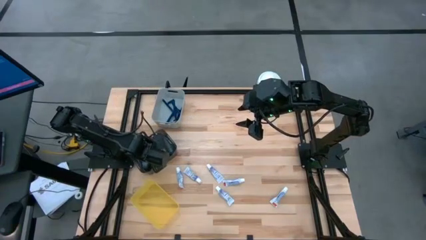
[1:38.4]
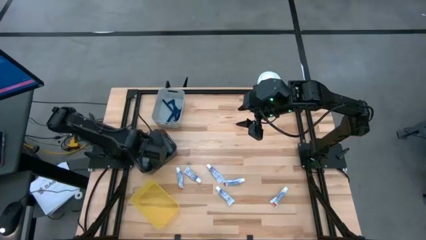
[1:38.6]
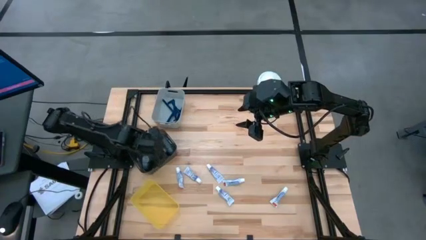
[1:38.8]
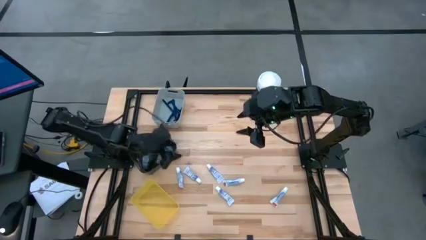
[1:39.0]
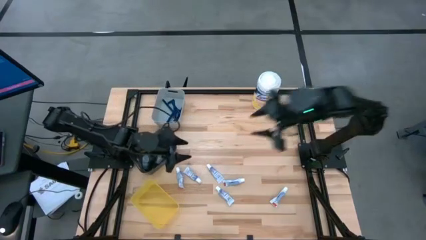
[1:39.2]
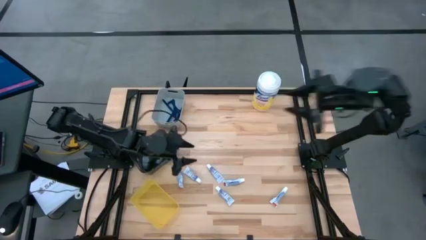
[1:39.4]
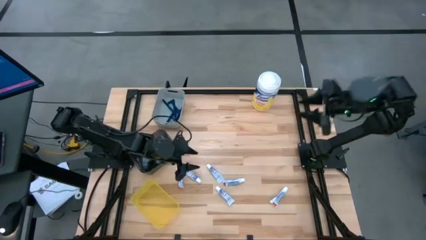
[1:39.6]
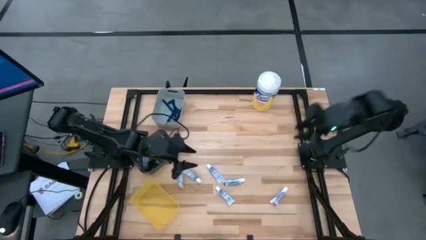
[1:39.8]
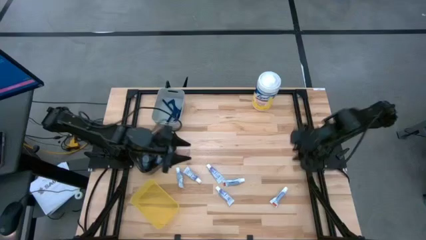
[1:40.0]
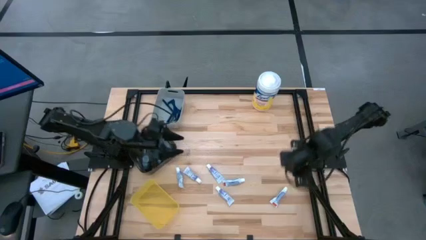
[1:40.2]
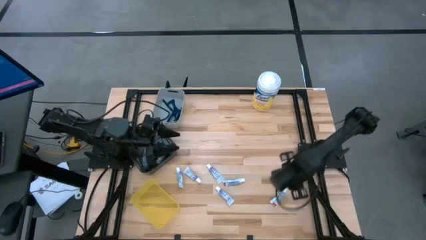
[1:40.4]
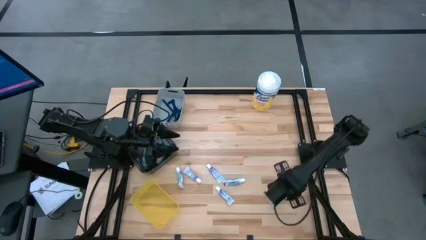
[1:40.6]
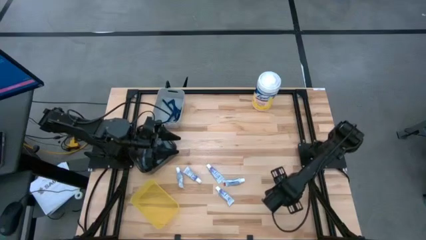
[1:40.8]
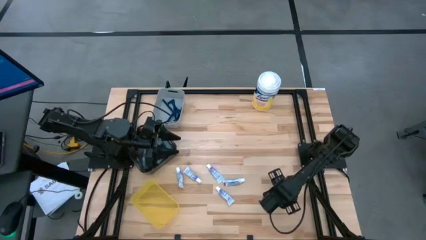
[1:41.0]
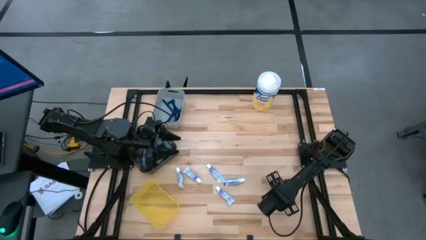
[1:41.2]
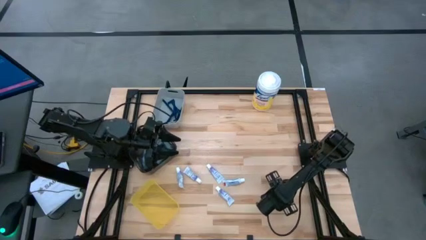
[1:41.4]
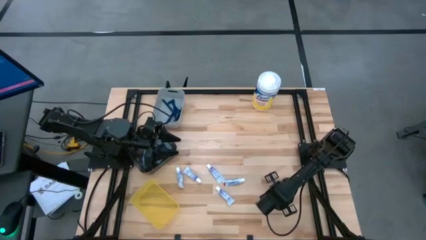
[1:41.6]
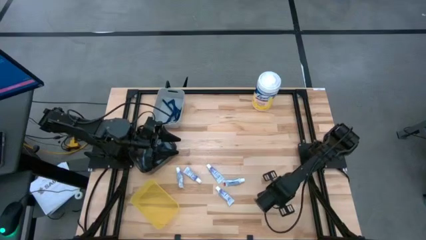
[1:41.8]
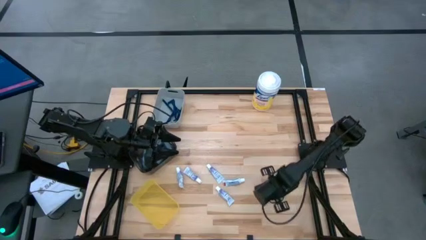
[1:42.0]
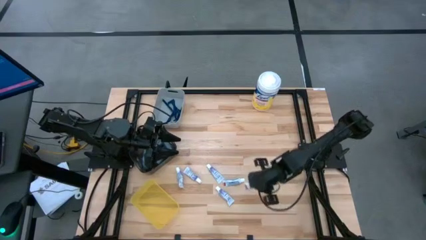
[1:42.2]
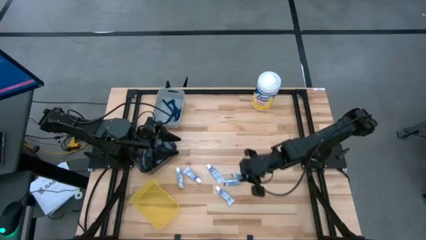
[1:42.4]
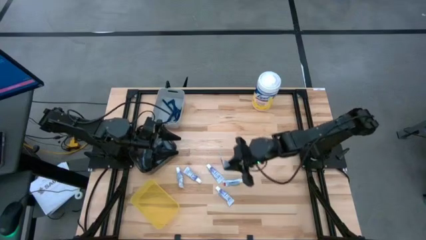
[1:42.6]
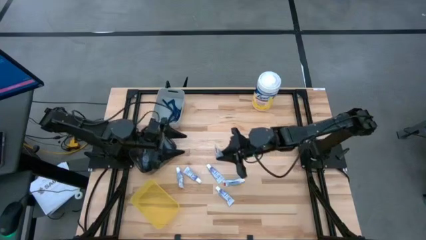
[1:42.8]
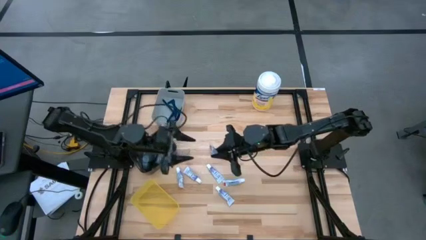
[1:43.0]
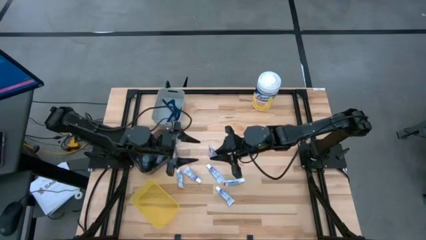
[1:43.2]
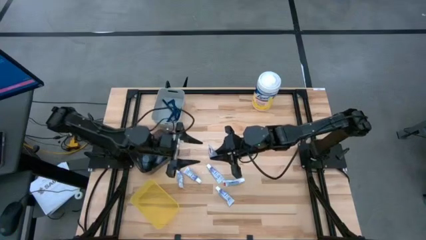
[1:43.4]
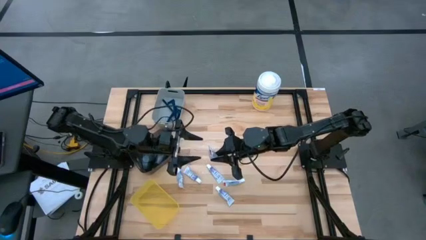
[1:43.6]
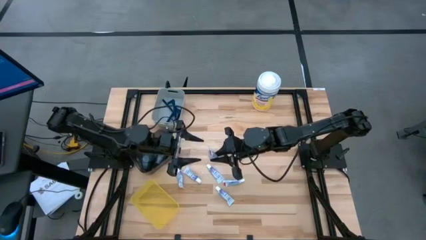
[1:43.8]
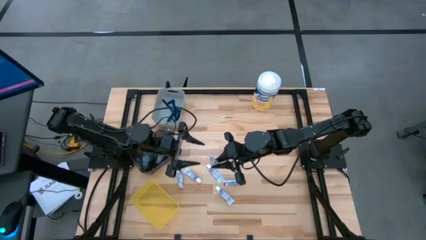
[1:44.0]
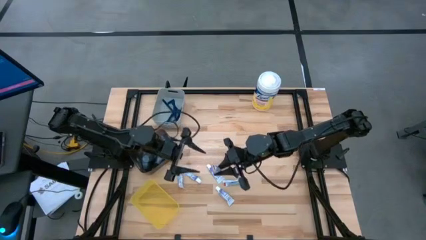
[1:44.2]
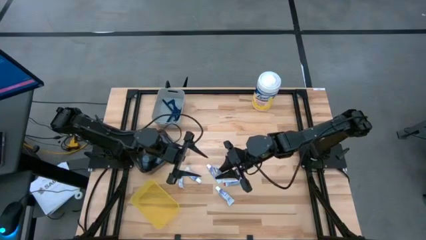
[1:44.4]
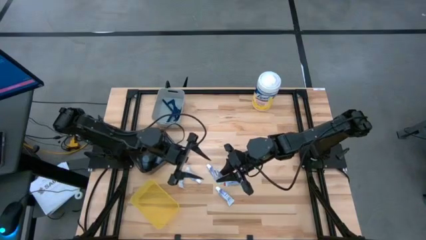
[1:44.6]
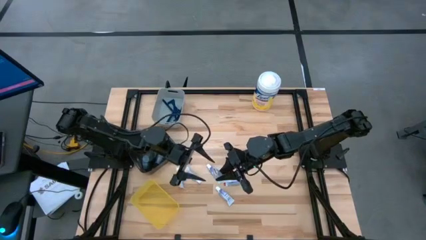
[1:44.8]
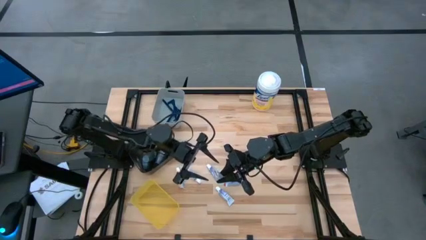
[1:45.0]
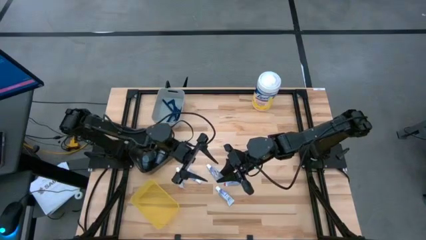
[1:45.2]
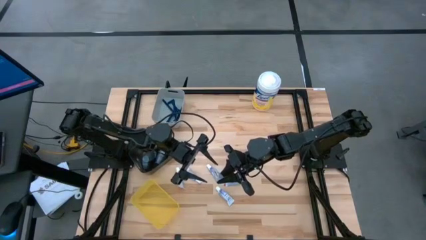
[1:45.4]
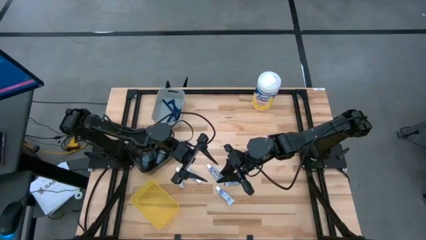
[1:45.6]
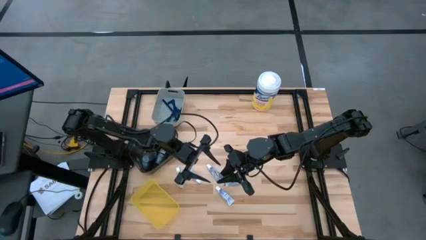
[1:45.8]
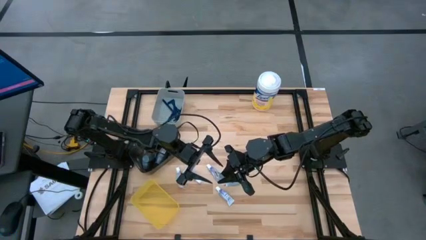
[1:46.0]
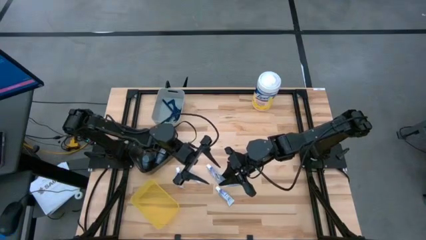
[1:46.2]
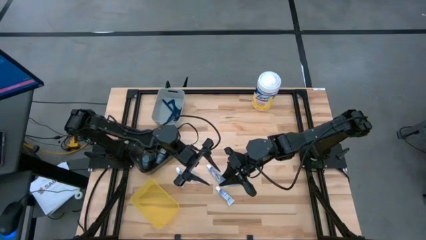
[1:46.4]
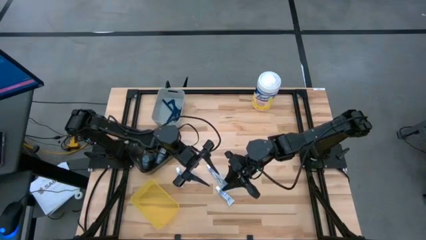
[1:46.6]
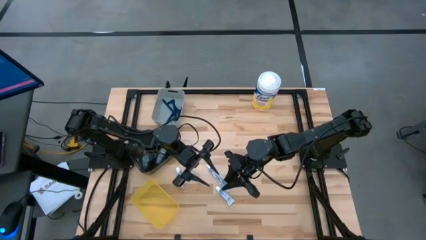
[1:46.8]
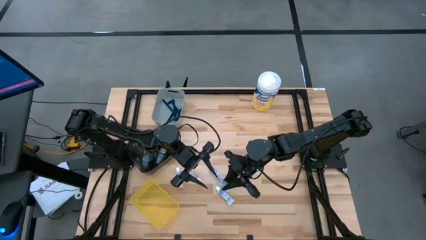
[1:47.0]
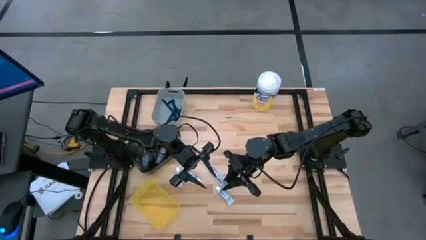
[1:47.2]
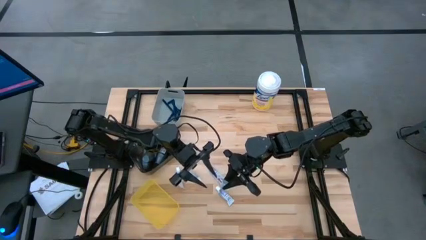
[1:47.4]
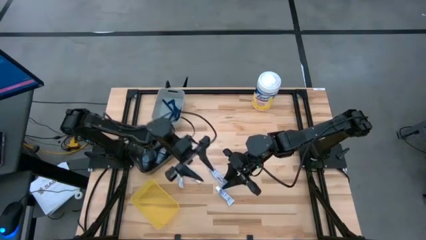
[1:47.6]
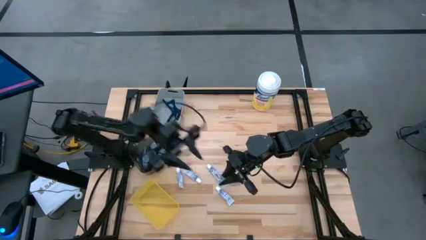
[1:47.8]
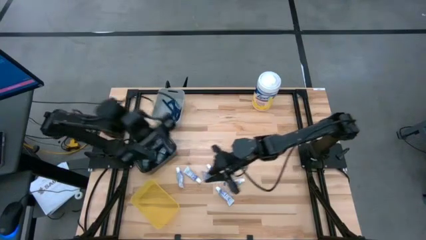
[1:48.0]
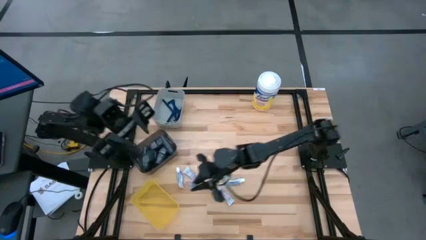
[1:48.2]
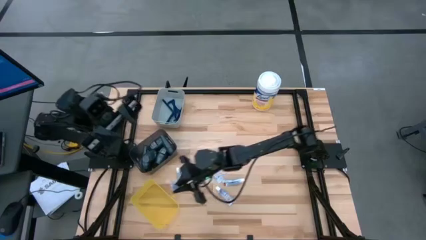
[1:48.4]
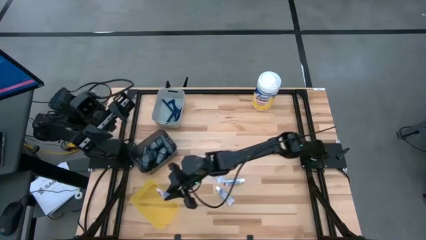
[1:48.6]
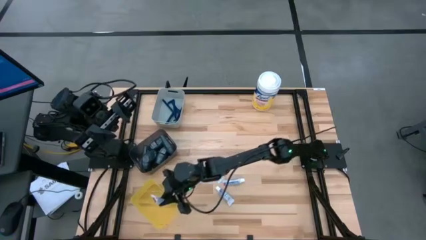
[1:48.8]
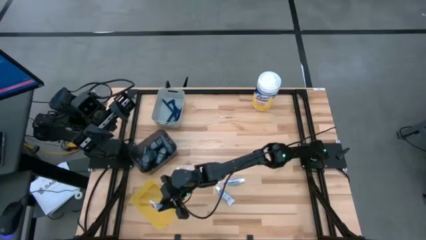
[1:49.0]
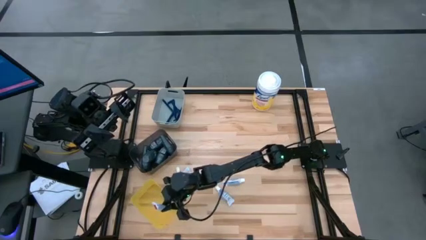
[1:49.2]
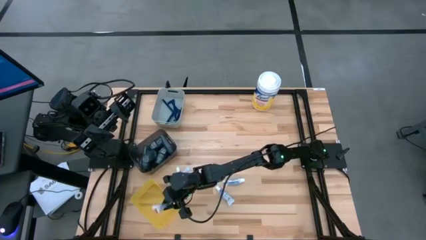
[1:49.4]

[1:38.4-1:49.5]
Task: Pick & Place Travel size toiletries
Put the toothpaste into the yellow bin

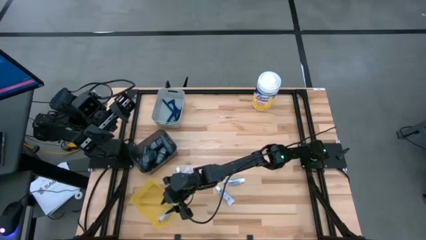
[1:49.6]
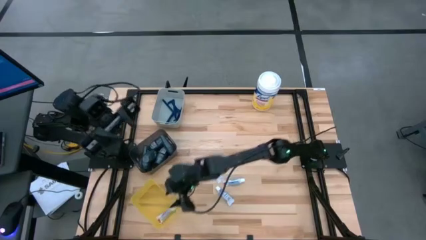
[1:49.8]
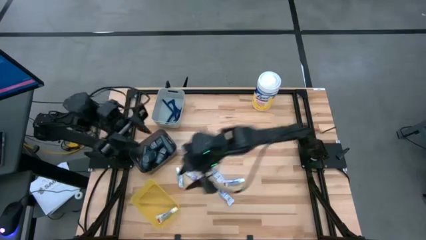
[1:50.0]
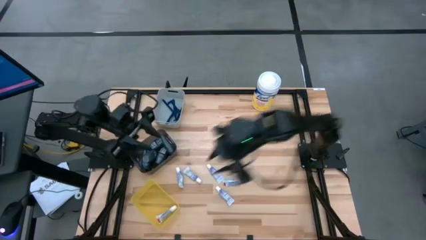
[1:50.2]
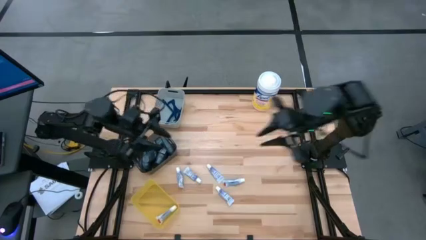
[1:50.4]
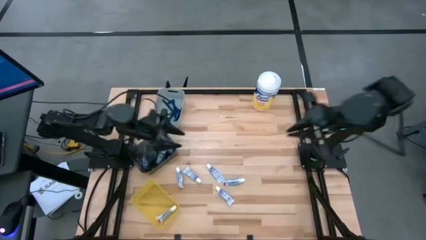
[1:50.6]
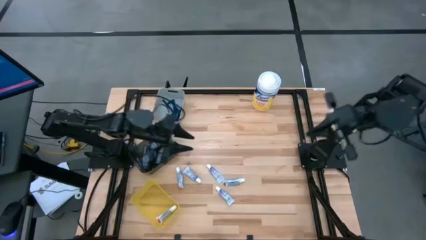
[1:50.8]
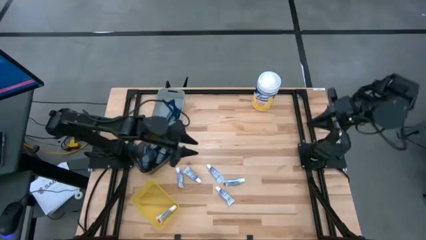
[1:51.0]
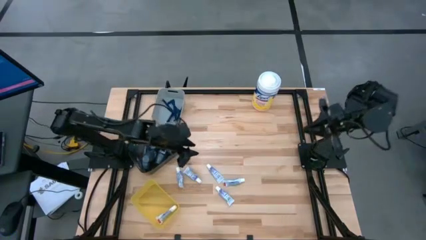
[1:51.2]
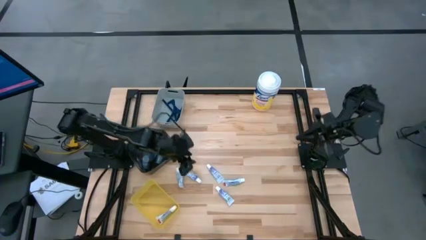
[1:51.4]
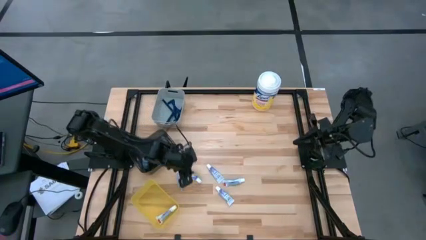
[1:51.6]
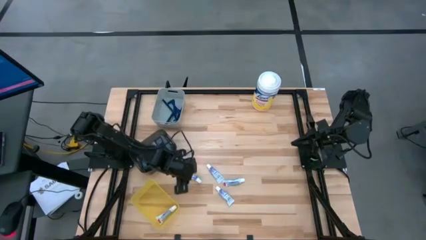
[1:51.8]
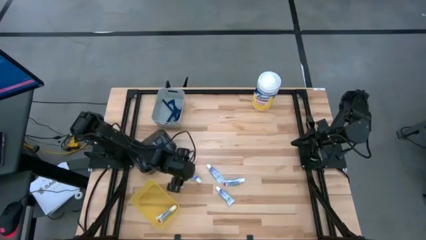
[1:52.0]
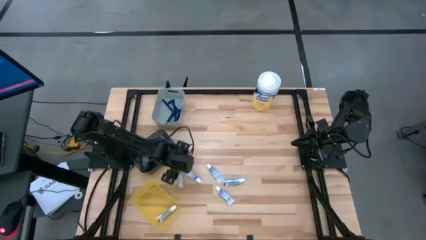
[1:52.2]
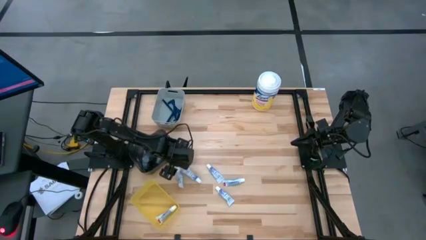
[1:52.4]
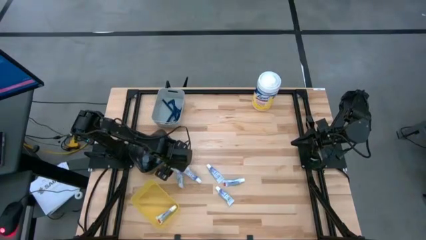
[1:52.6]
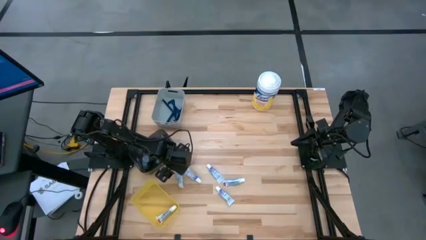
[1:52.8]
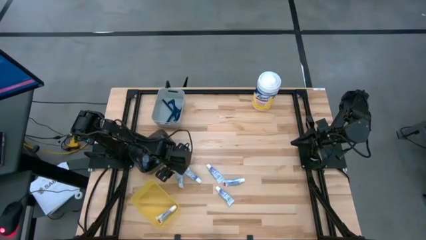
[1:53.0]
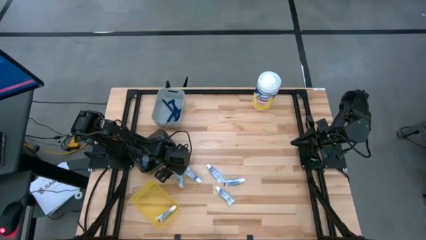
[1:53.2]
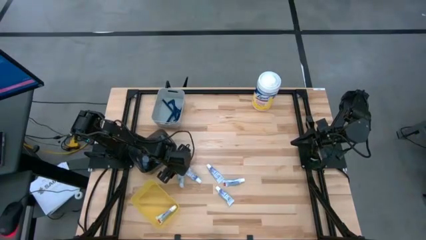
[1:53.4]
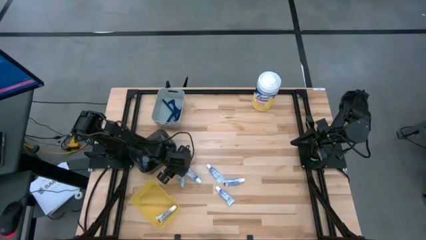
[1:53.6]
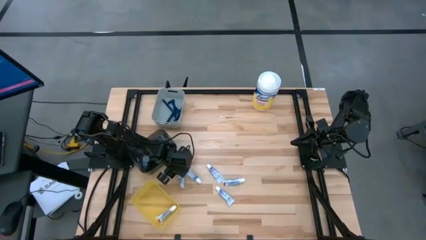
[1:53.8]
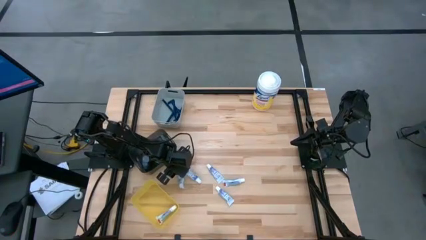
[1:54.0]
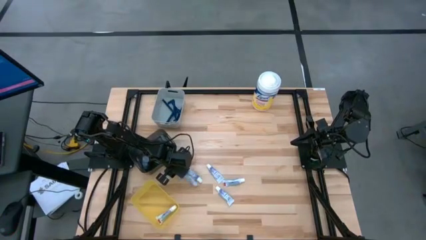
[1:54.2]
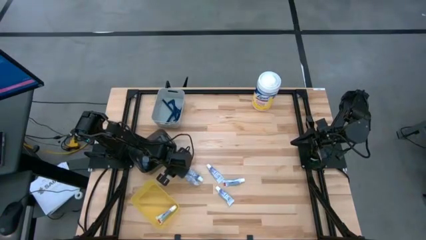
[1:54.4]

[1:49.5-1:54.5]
Put the toothpaste into the yellow bin

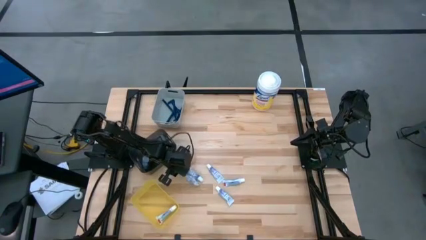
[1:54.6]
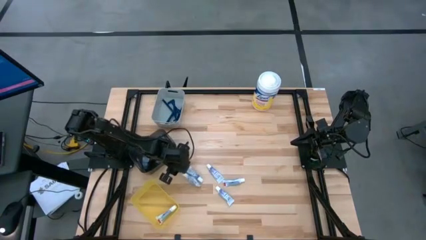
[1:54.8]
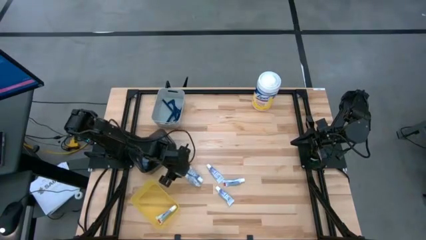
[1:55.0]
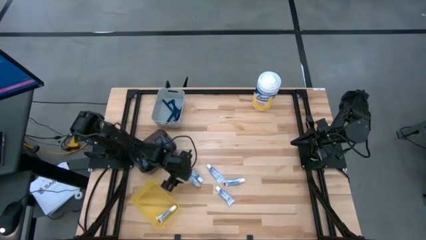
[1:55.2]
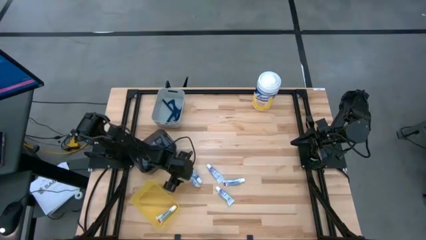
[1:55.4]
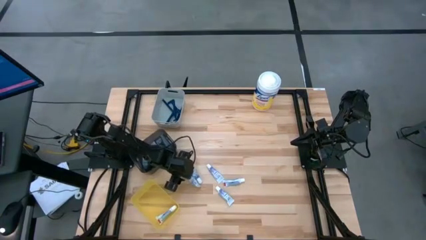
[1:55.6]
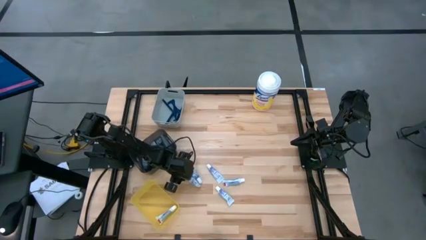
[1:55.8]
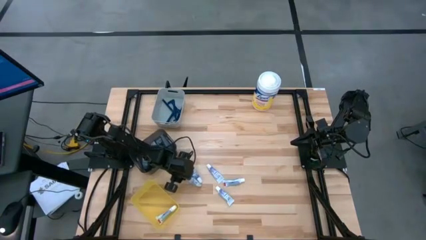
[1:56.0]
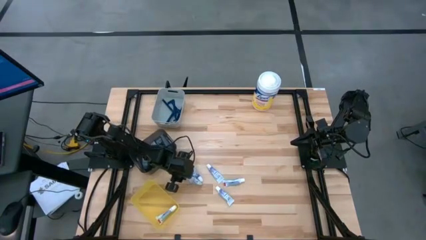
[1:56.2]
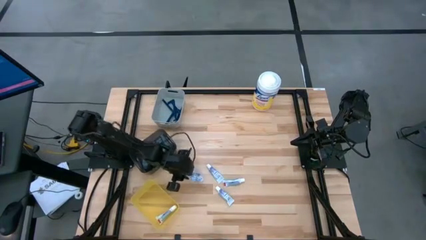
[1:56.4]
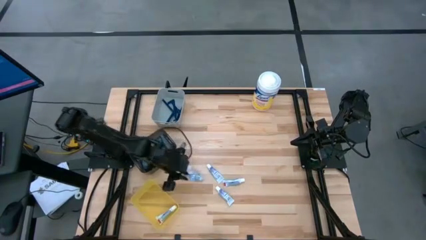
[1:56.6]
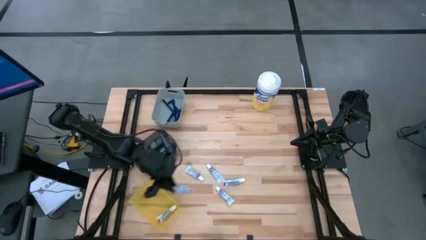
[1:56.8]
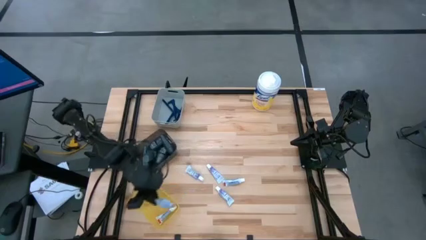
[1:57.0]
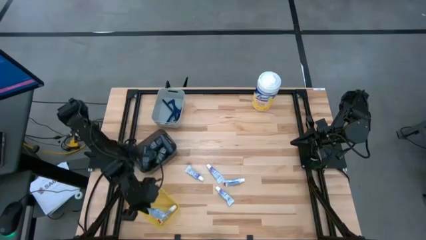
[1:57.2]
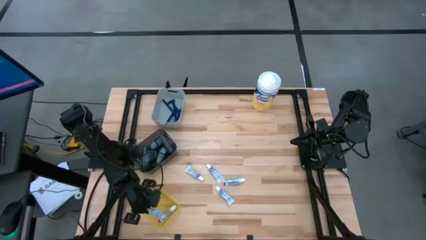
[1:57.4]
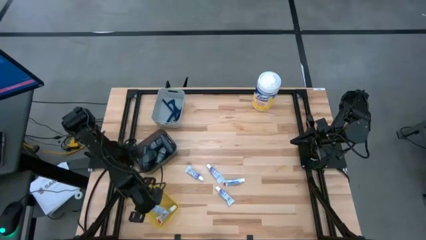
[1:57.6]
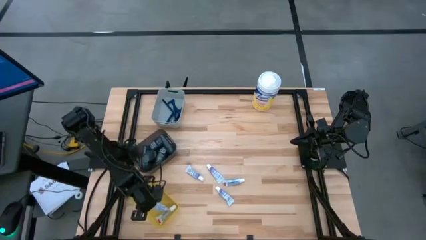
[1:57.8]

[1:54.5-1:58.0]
Put the toothpaste into the yellow bin
